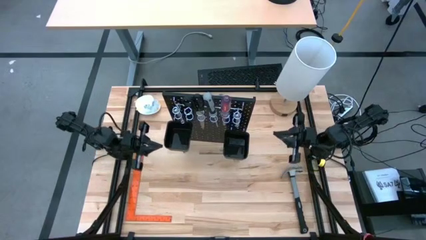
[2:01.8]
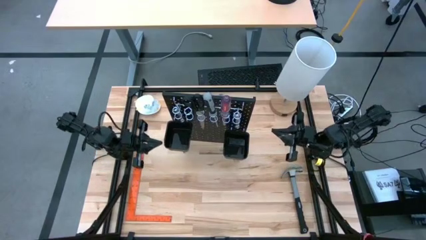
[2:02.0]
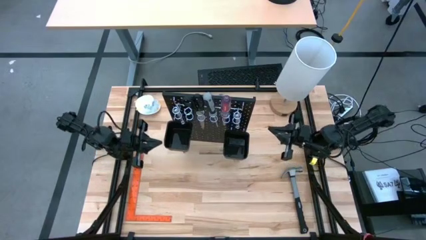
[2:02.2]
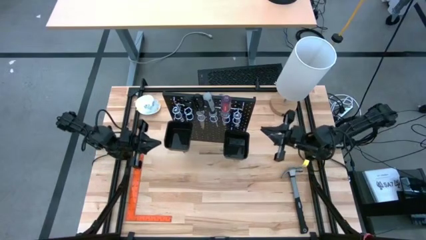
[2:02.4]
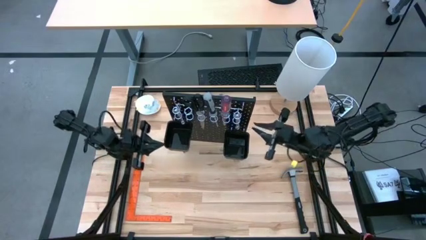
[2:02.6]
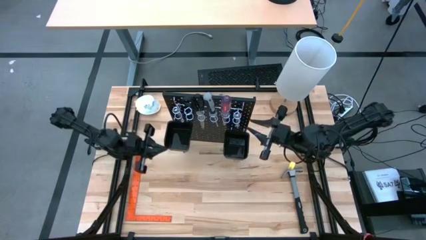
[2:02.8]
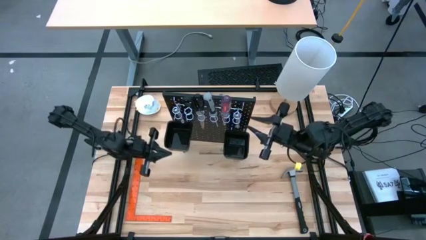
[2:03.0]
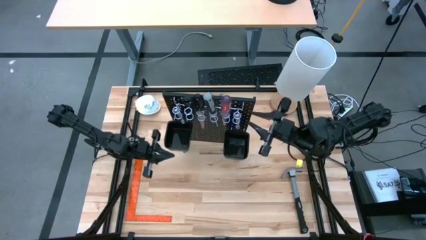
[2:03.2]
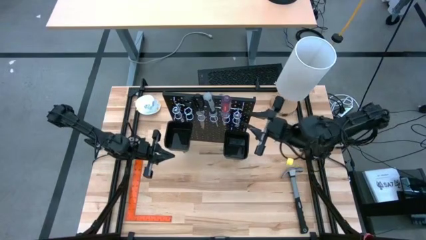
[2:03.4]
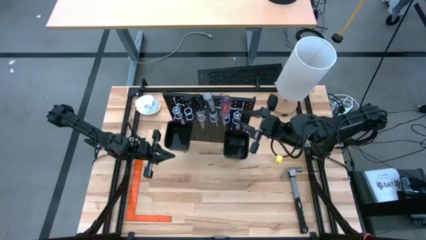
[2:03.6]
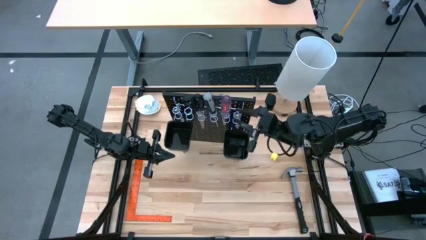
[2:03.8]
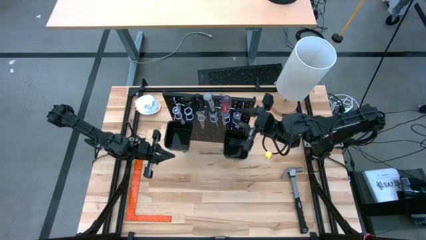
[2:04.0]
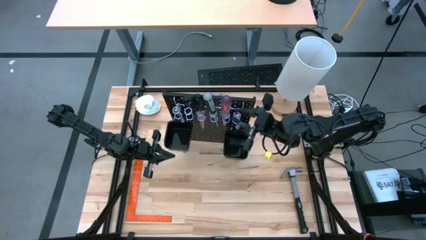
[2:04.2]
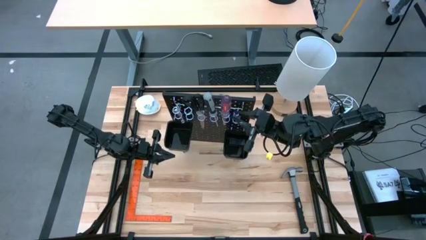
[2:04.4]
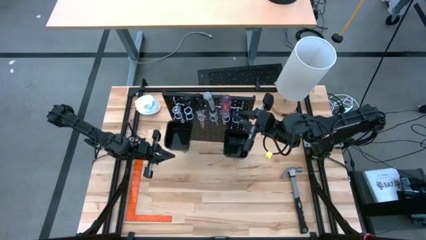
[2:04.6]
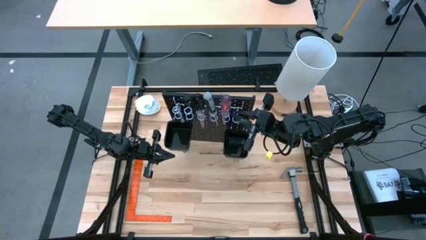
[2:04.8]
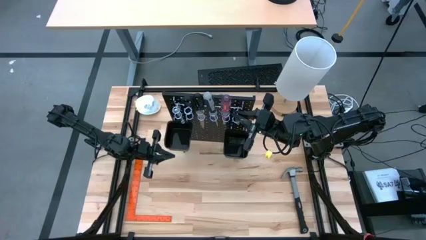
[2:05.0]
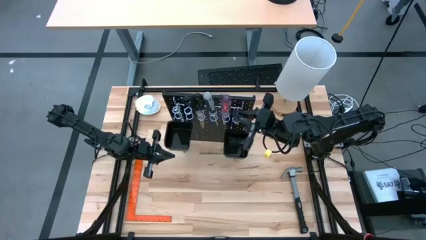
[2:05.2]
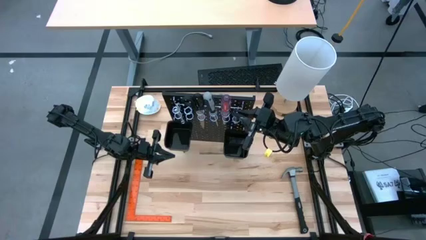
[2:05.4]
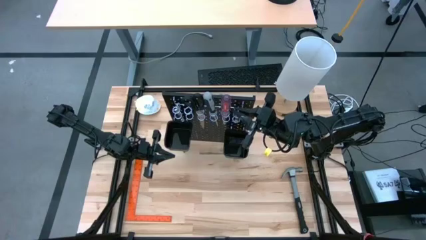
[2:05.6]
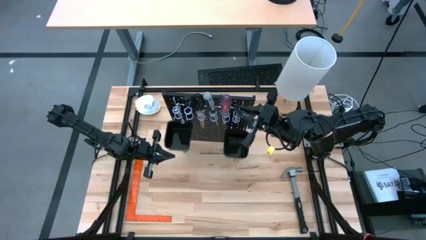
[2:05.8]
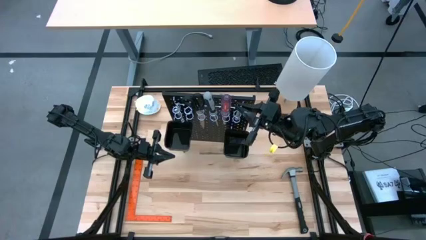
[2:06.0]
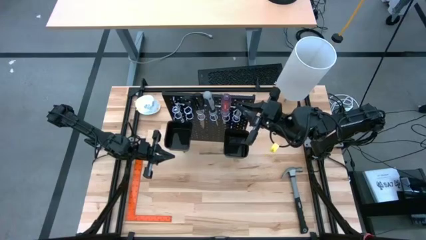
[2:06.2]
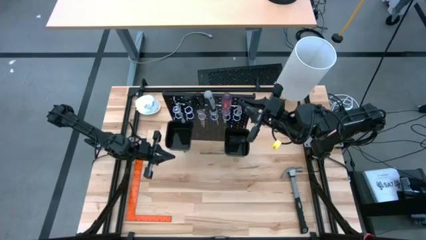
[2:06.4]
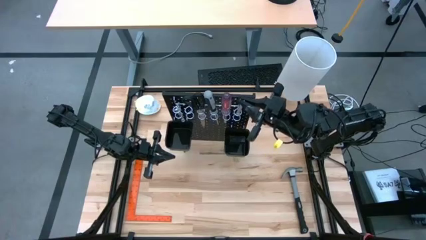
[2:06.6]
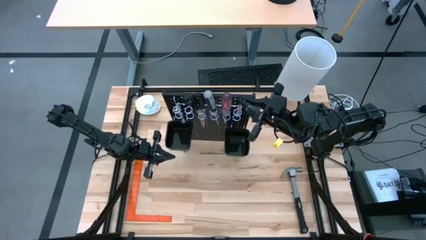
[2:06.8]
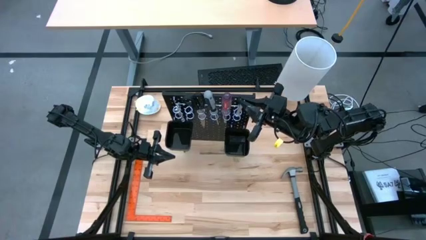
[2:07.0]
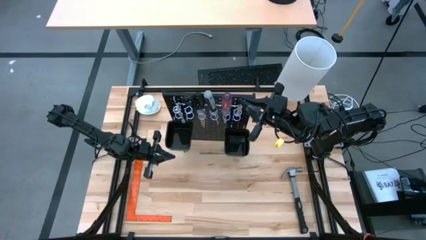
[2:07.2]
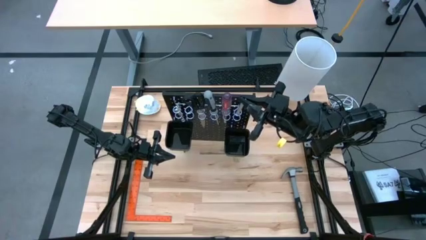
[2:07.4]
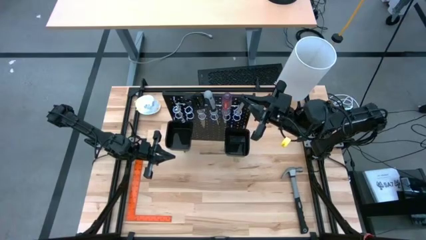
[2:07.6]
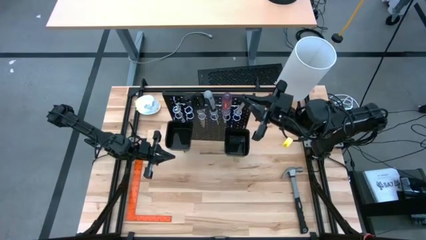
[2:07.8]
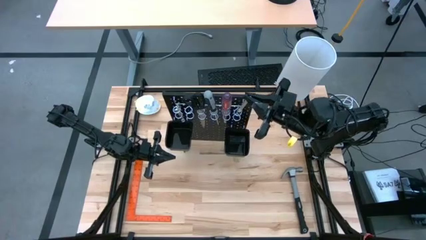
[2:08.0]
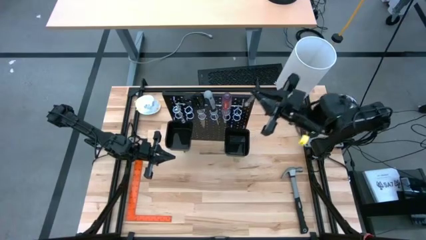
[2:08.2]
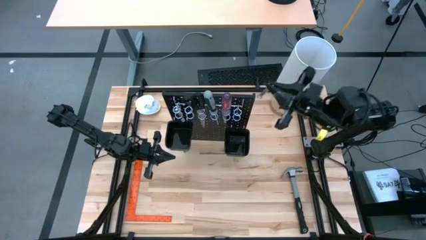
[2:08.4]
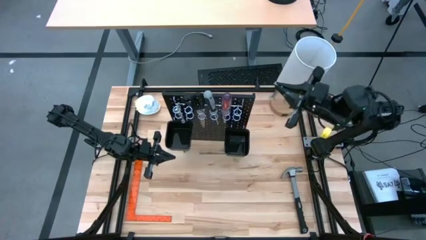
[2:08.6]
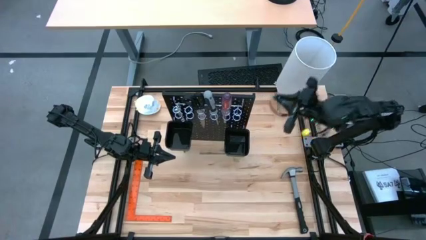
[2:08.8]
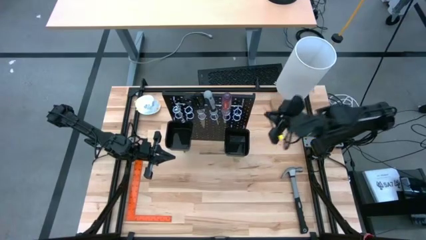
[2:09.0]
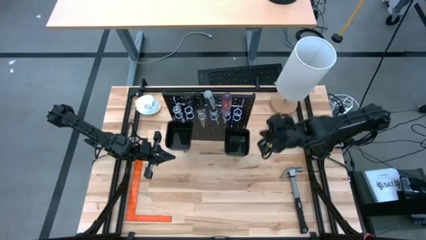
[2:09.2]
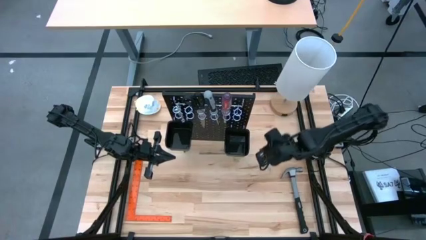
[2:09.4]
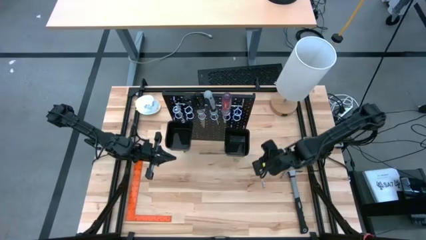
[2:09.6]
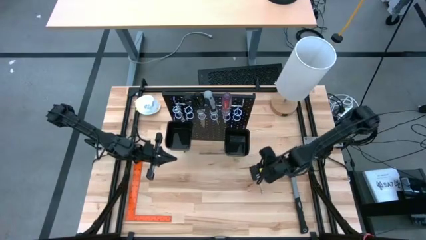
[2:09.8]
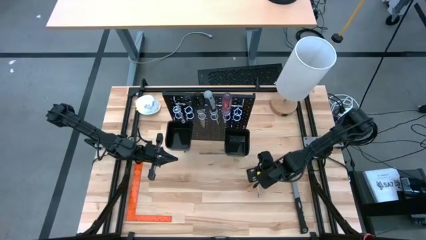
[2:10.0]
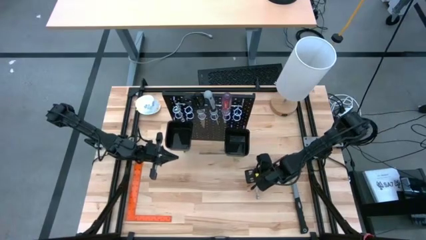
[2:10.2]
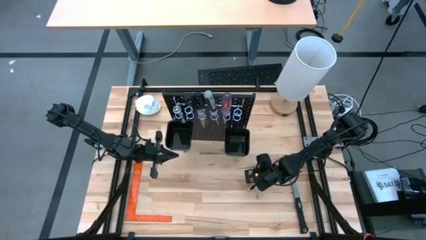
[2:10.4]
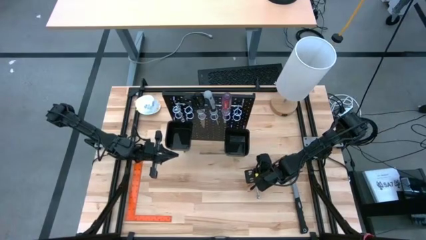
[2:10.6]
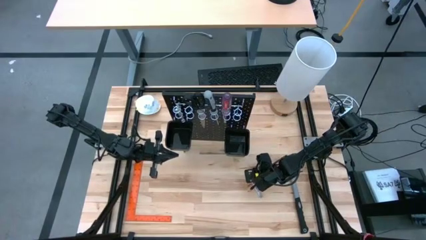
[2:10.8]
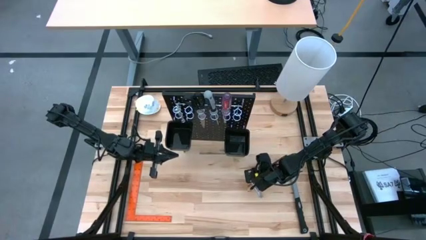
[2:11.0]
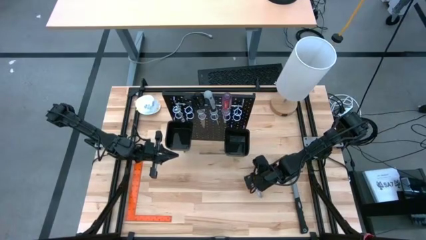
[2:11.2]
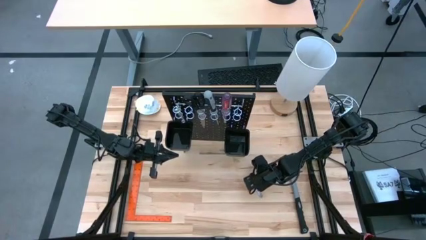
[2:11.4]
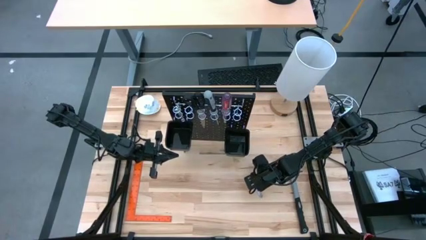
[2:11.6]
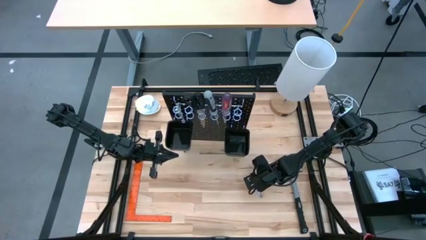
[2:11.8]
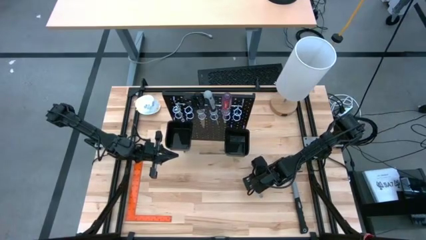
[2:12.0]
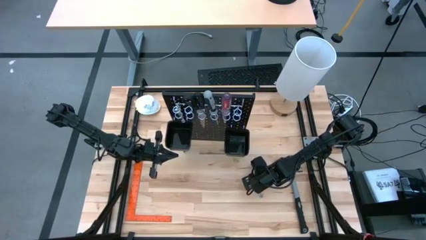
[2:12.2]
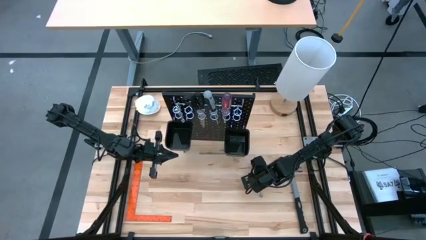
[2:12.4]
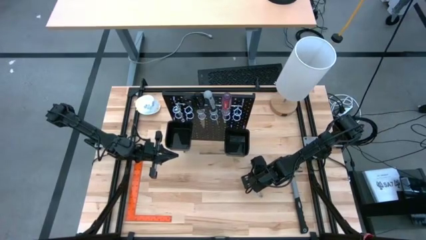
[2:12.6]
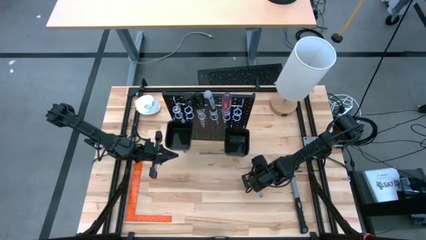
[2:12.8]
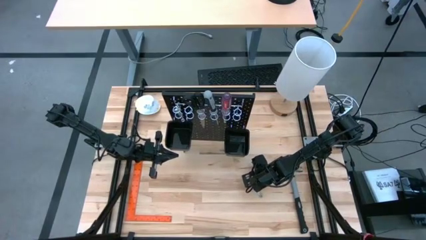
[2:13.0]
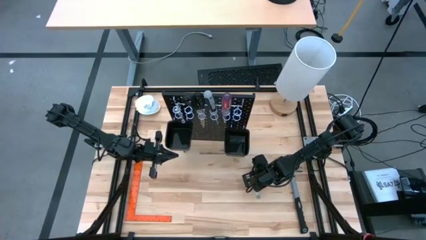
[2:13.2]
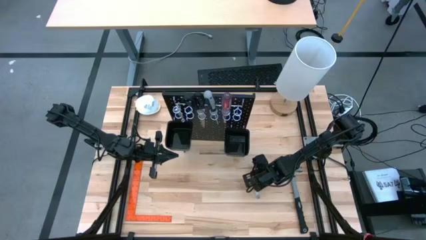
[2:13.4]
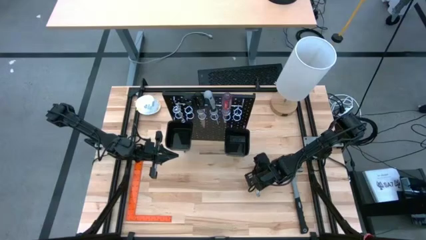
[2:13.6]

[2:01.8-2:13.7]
Task: Hang tools onto peg board
Remove the silver wrench from the black peg board

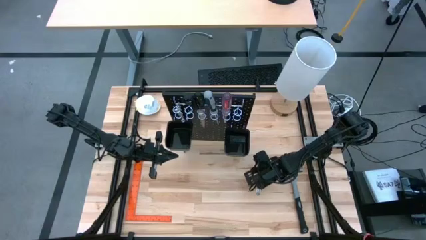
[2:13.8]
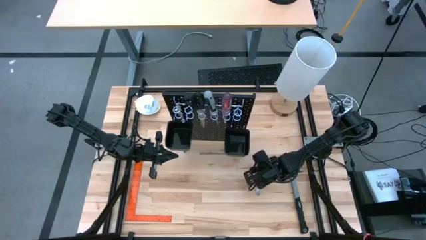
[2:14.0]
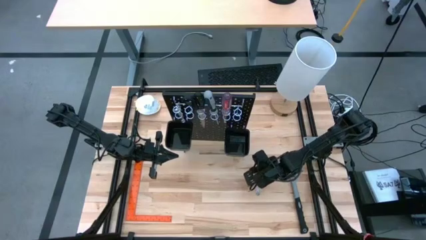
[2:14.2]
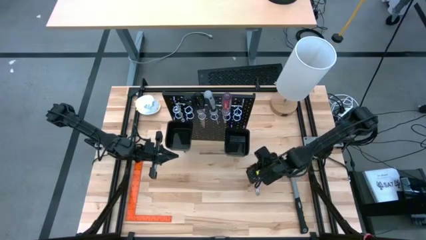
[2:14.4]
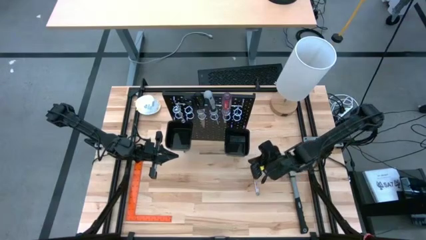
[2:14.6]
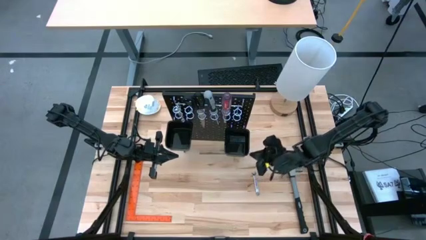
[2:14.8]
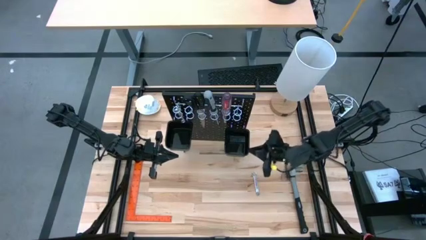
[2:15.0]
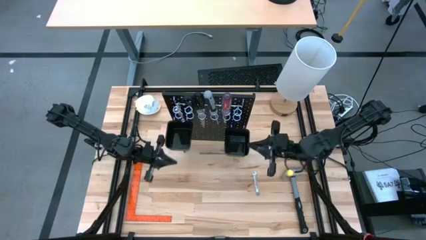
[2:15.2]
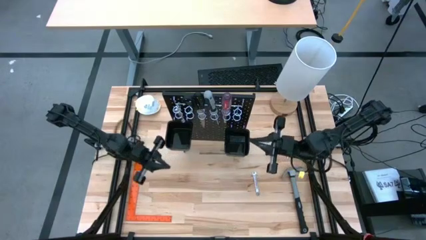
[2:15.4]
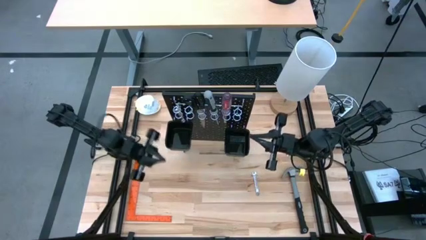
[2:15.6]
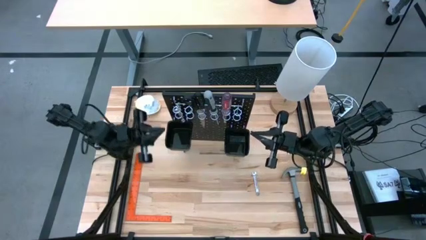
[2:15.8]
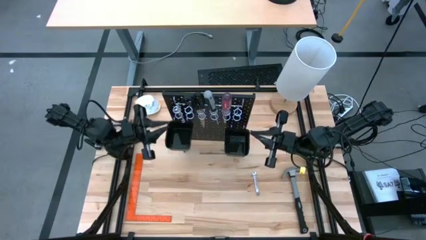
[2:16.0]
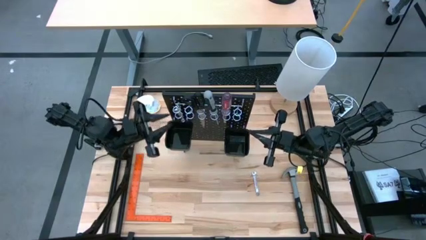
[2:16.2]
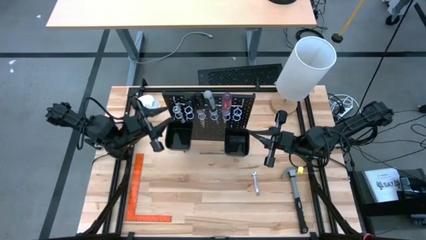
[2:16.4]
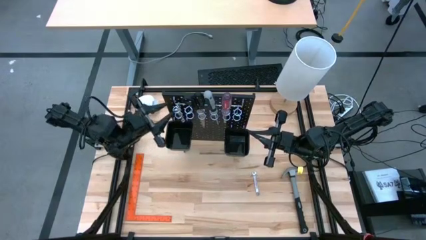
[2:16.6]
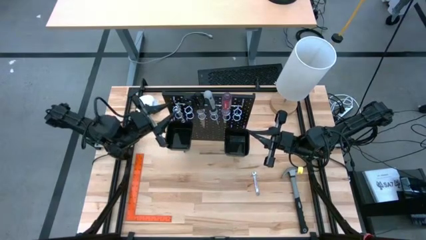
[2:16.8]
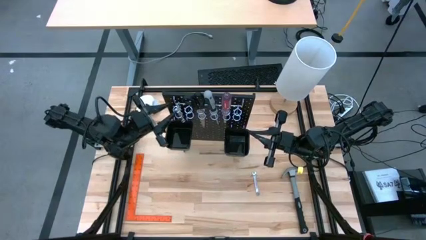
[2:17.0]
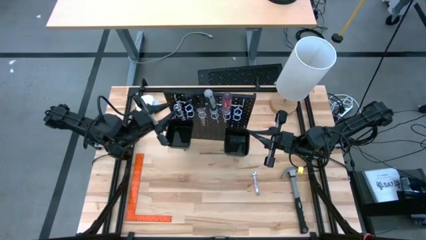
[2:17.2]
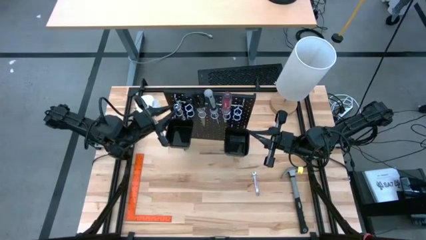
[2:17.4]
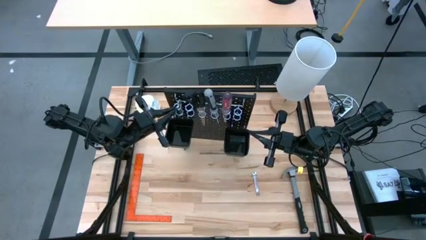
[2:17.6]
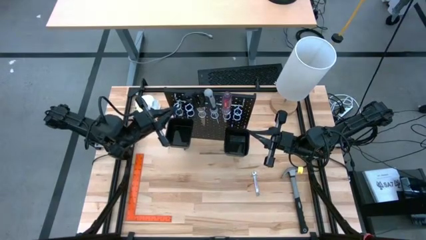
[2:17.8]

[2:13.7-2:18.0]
Remove the silver wrench from the black peg board
